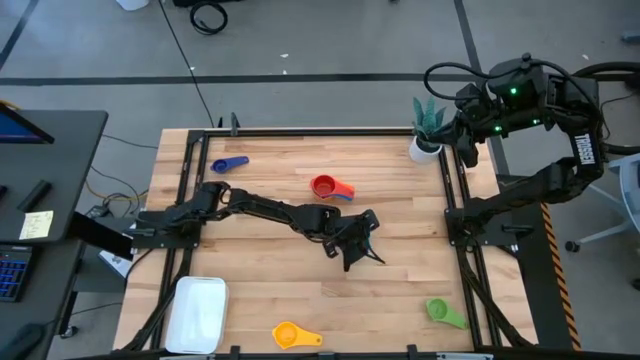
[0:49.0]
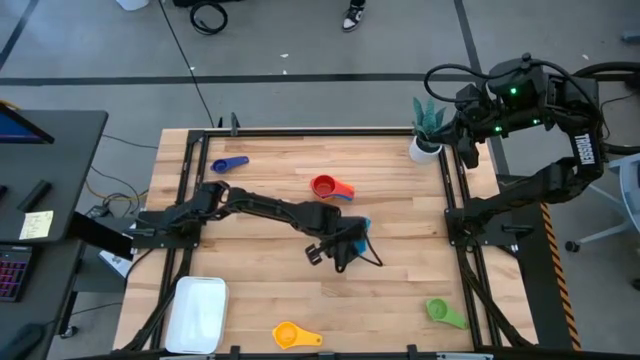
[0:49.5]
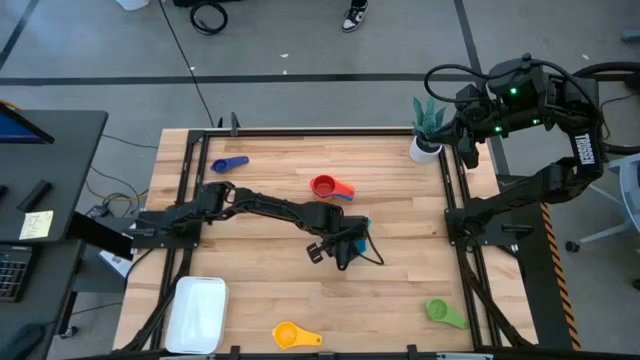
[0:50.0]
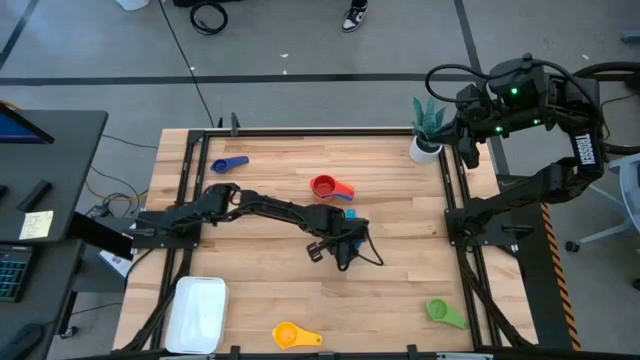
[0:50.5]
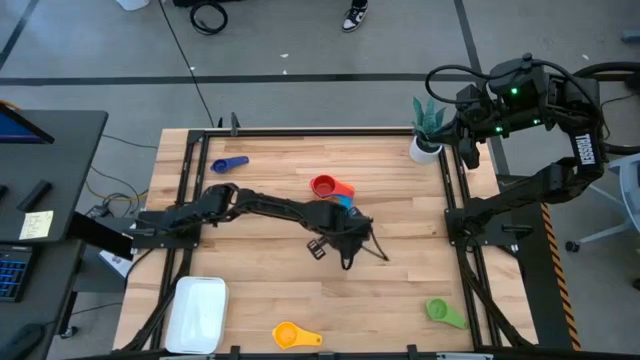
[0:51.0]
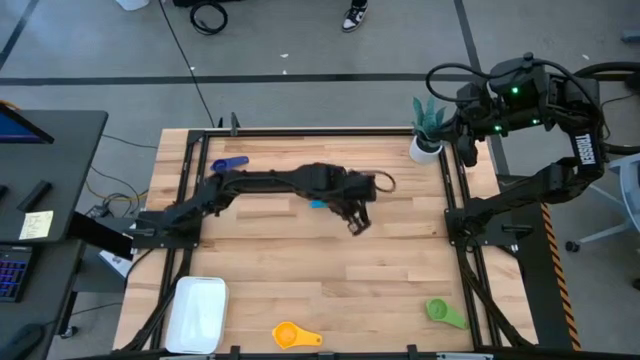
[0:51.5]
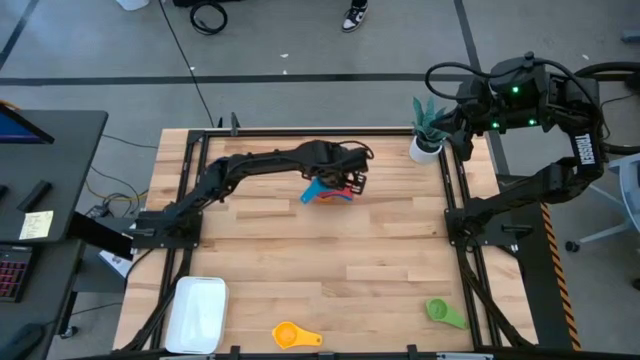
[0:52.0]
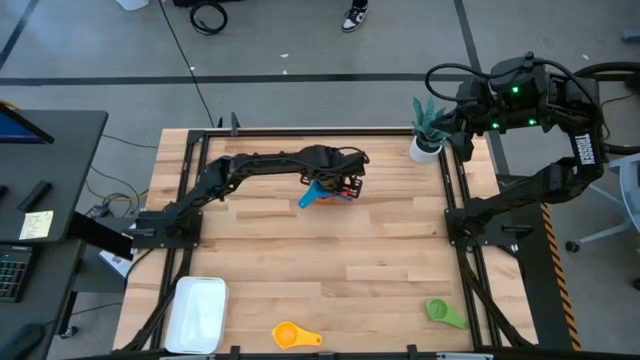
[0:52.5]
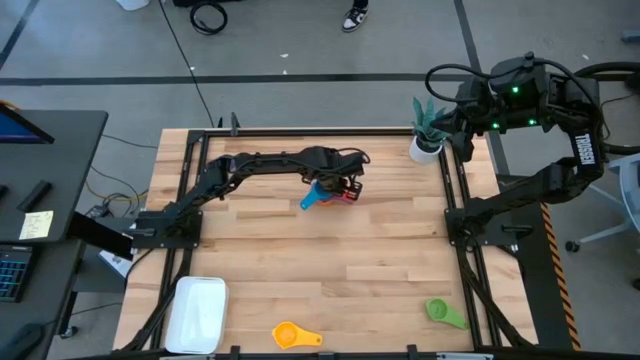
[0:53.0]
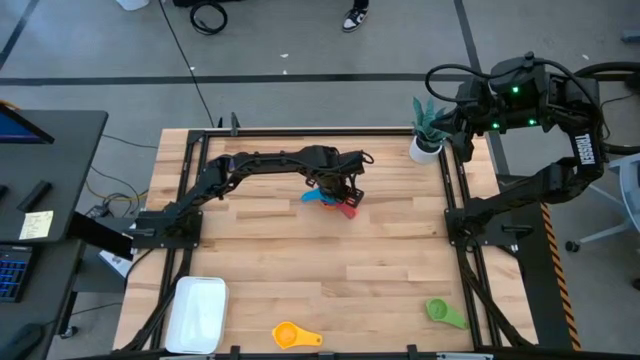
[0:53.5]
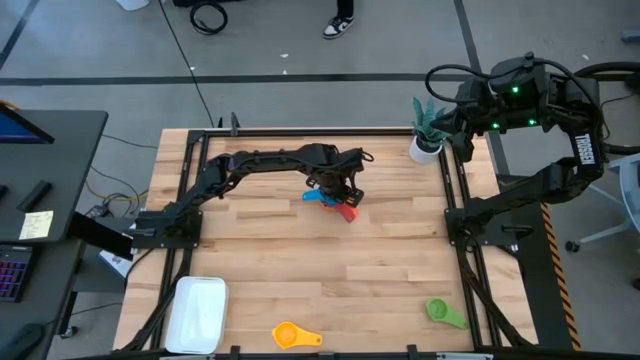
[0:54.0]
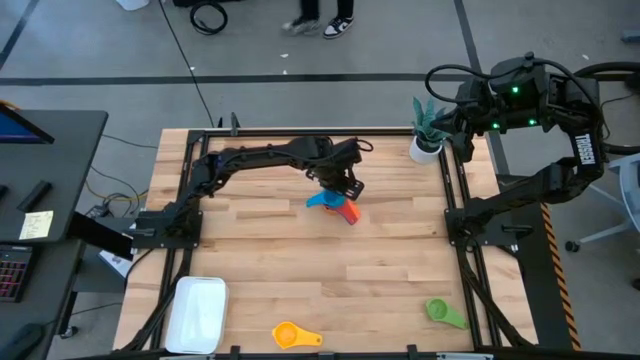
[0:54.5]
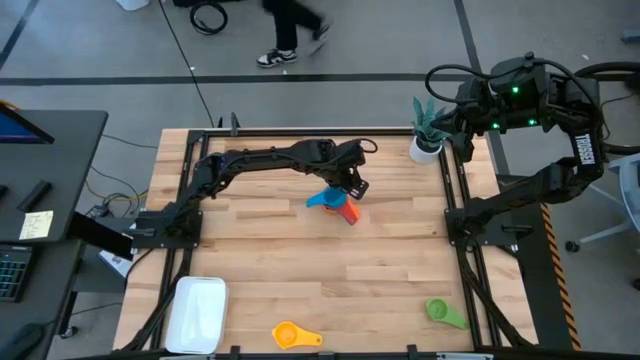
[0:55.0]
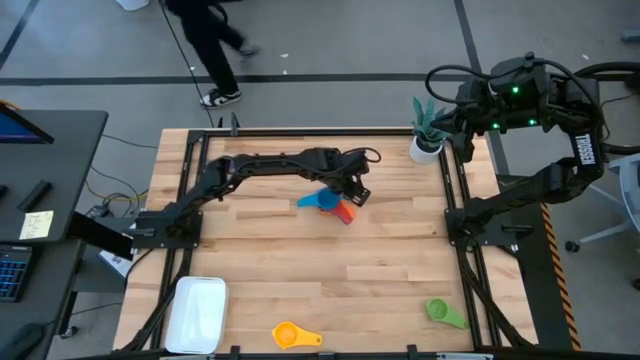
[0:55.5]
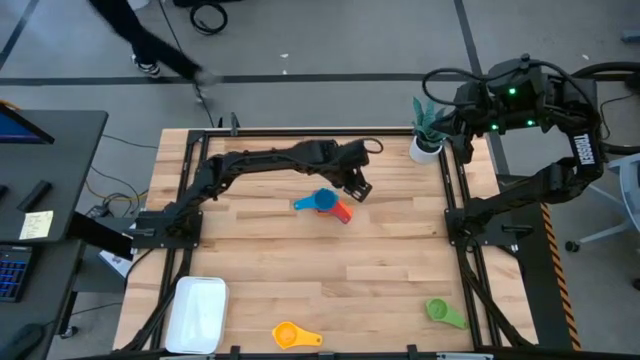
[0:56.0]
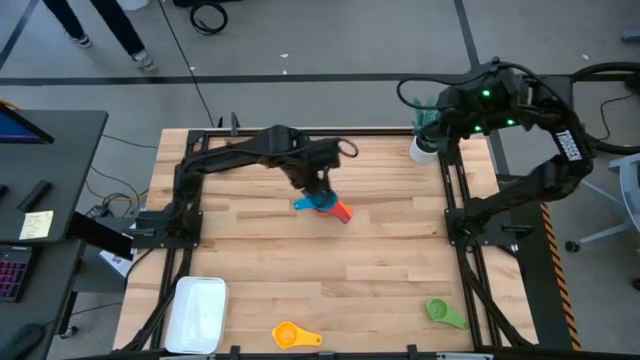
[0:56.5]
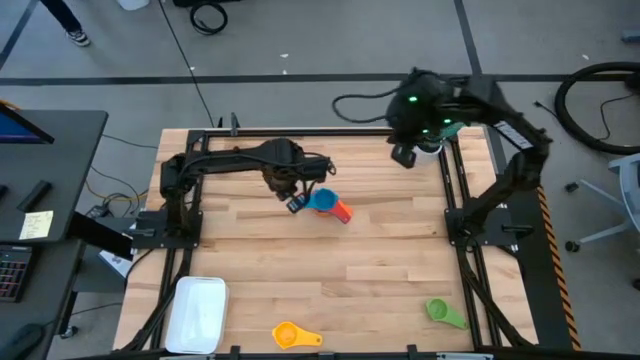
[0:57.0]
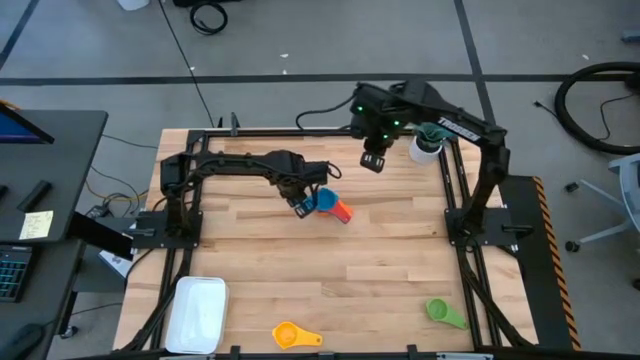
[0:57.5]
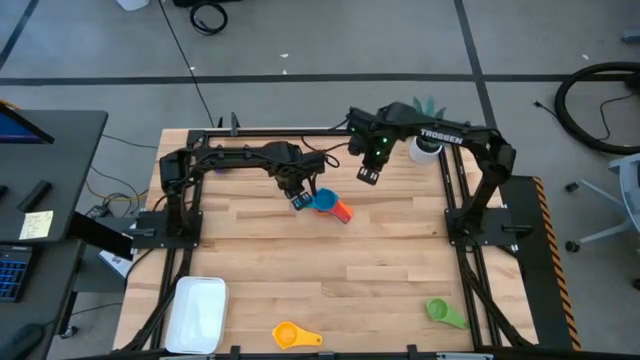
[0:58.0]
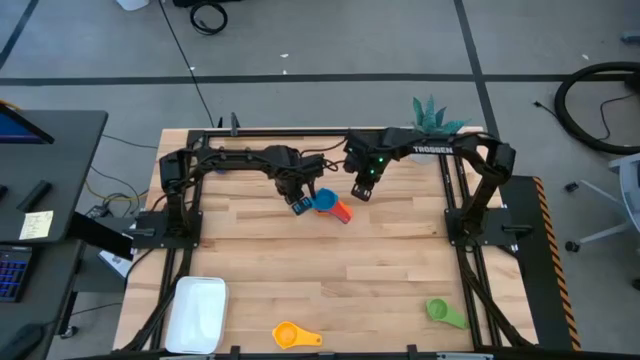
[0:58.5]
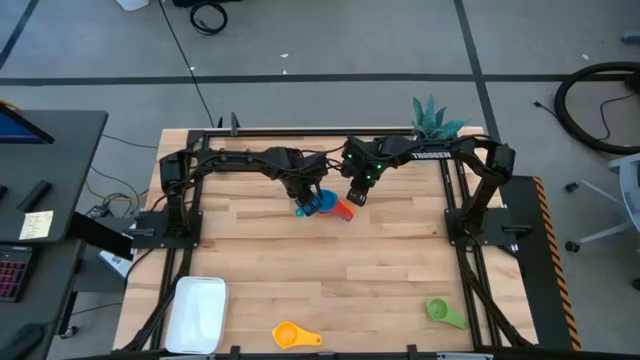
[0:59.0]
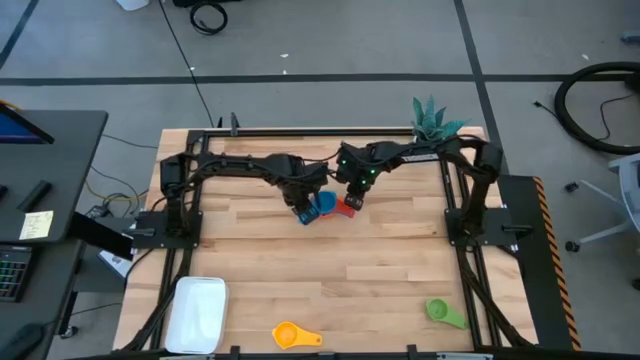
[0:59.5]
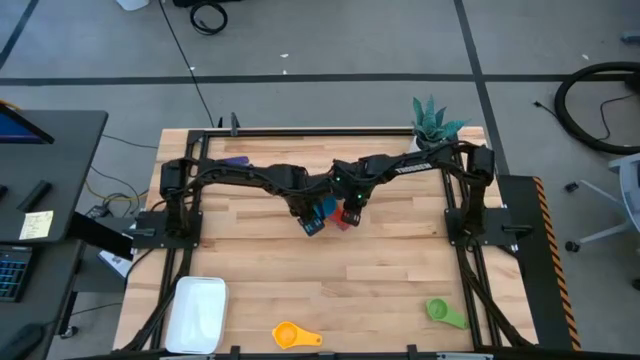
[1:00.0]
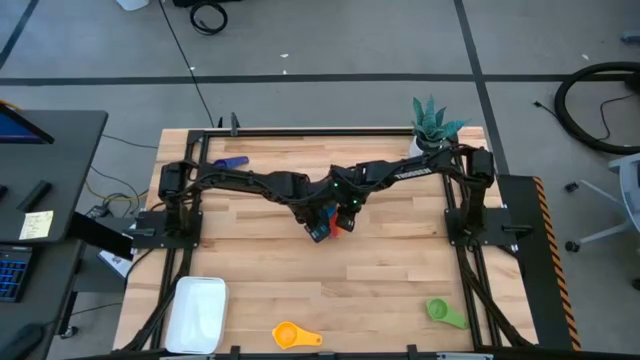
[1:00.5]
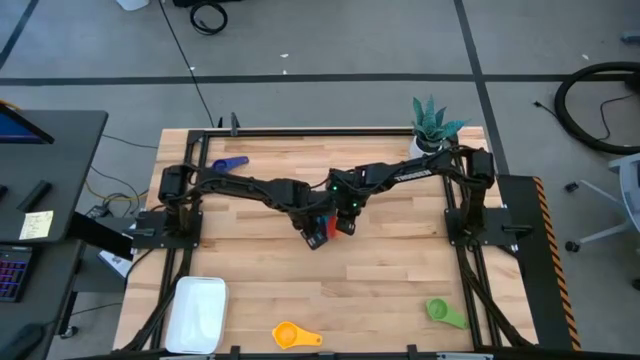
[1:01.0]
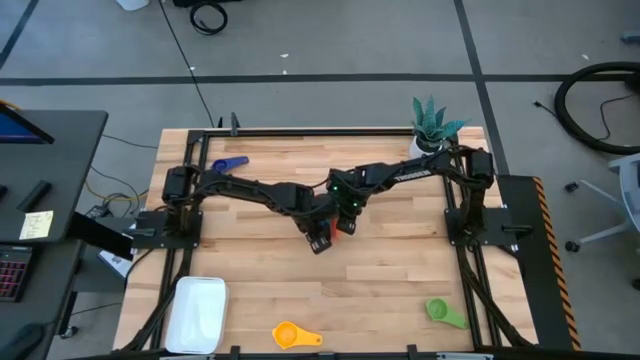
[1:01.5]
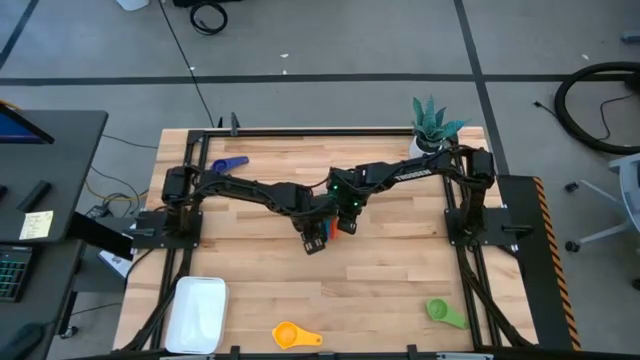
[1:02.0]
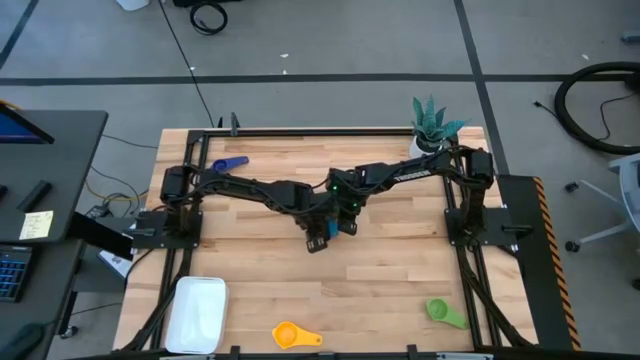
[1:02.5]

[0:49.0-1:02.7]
Task: Nest measuring cups in basket
Stack the light blue measuring cup on top of the red measuring cup

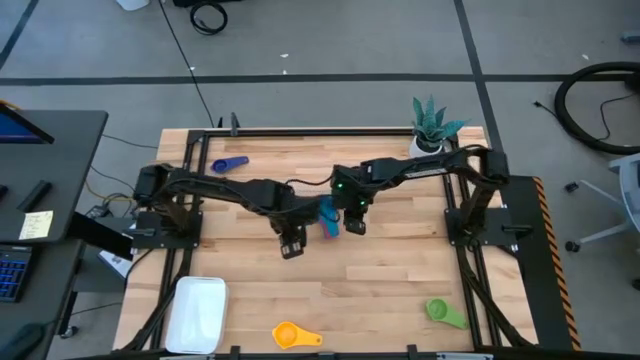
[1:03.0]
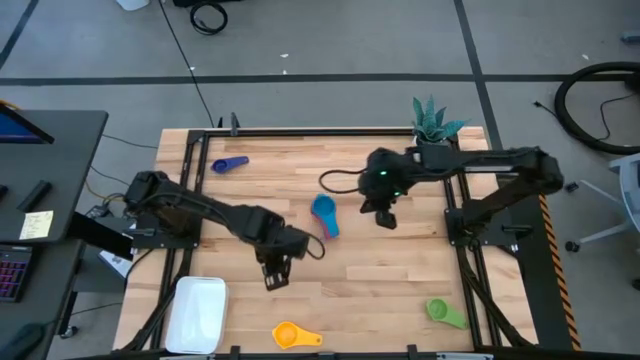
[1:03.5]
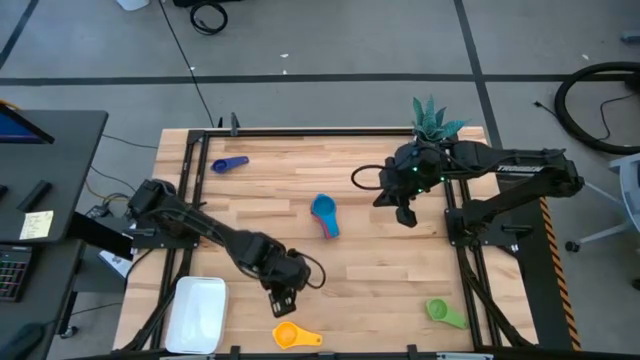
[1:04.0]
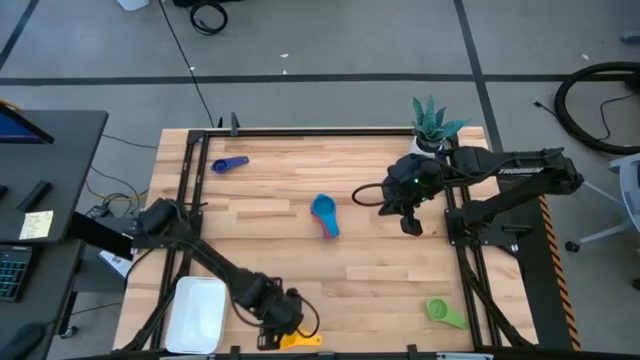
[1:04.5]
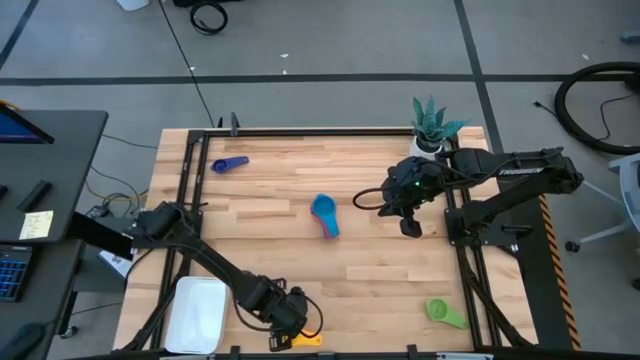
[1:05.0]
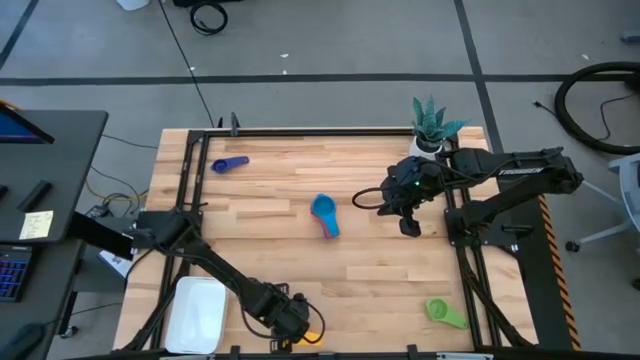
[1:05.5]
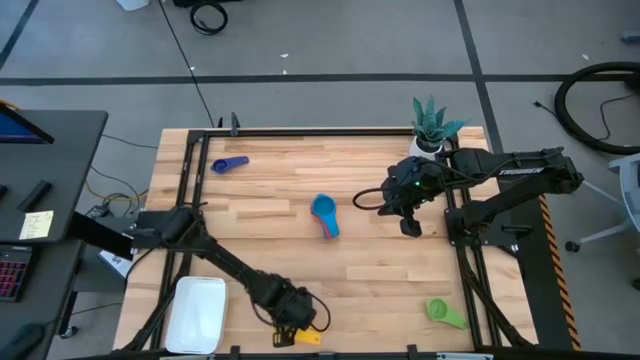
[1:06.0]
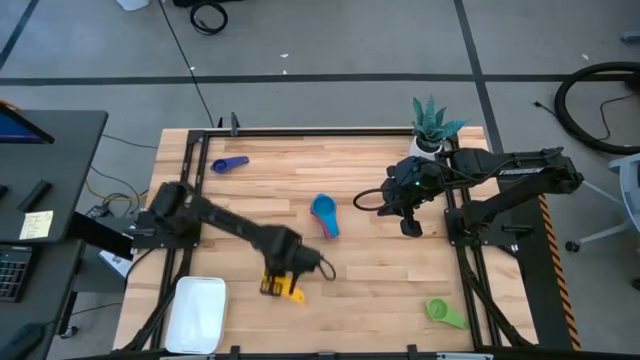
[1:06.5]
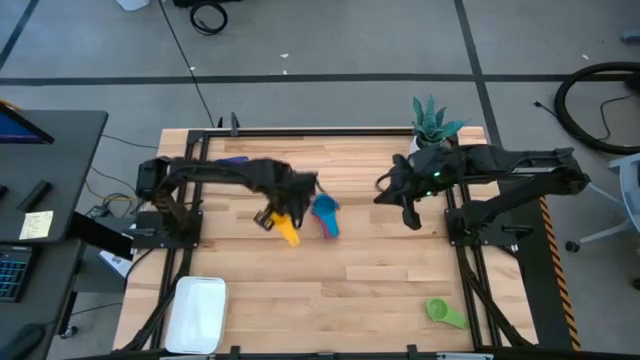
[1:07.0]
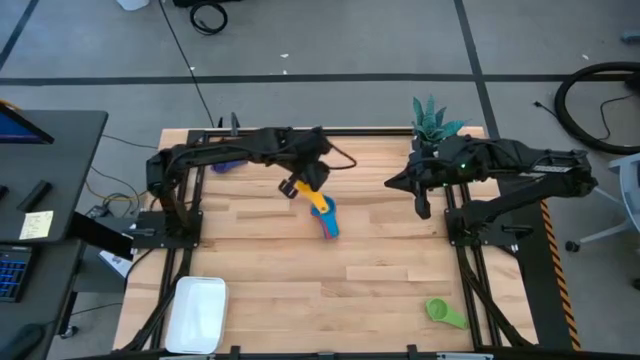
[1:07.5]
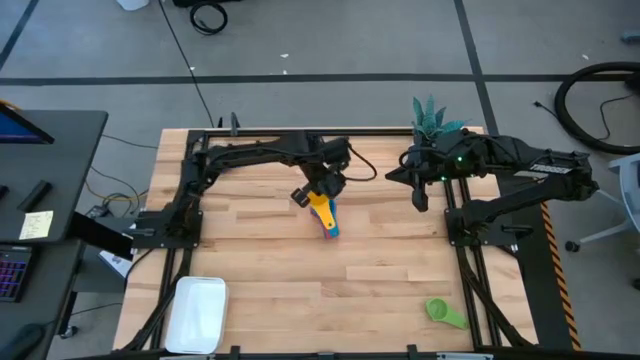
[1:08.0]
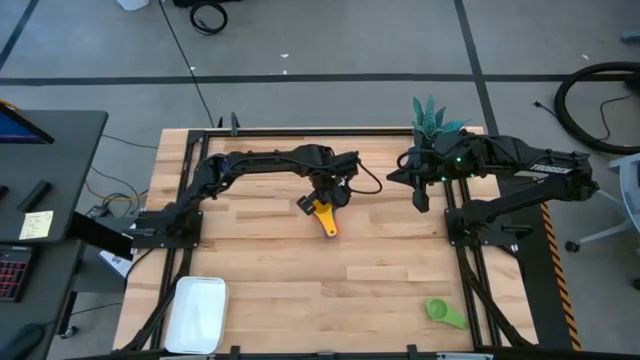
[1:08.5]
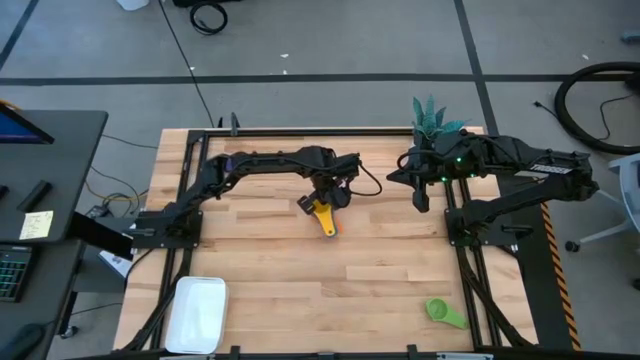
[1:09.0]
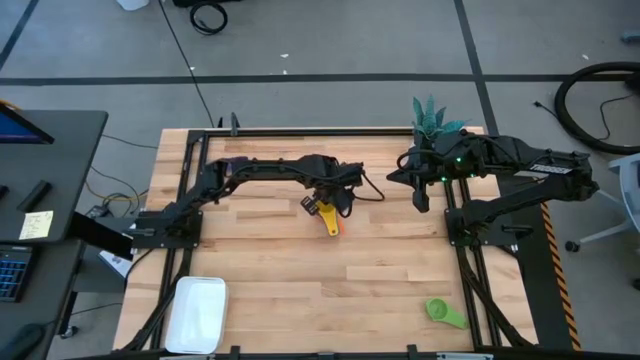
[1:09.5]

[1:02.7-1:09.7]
Stack the yellow measuring cup on top of the light blue measuring cup

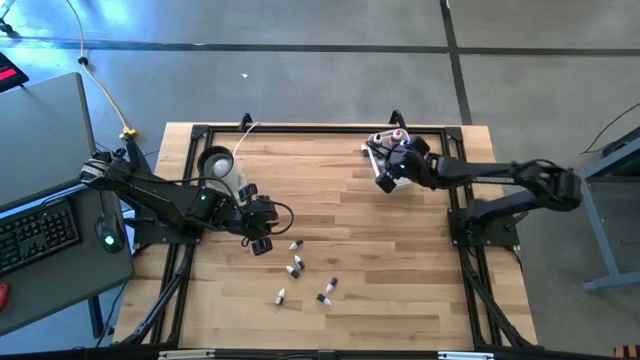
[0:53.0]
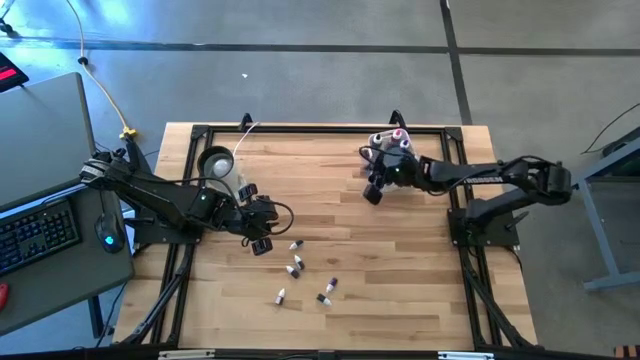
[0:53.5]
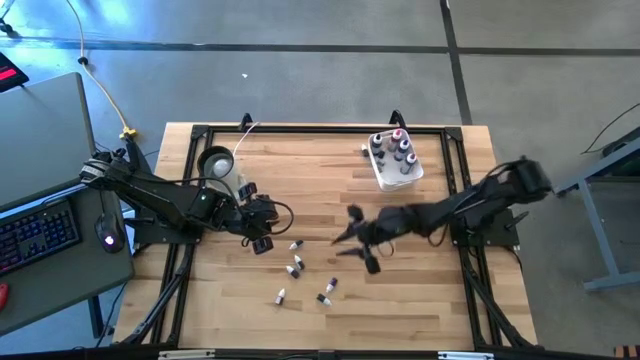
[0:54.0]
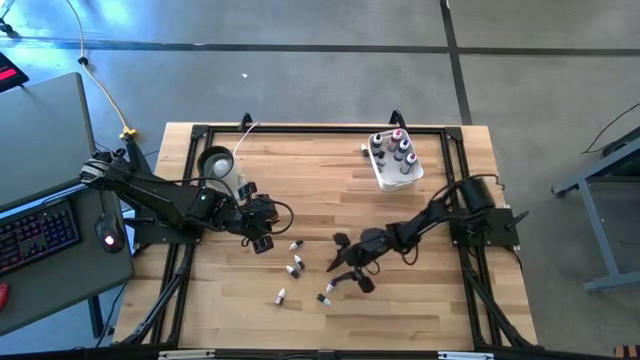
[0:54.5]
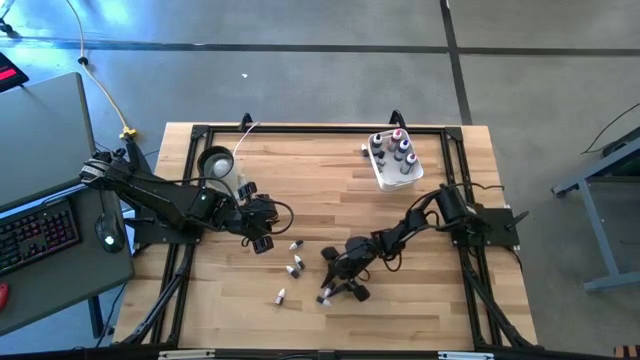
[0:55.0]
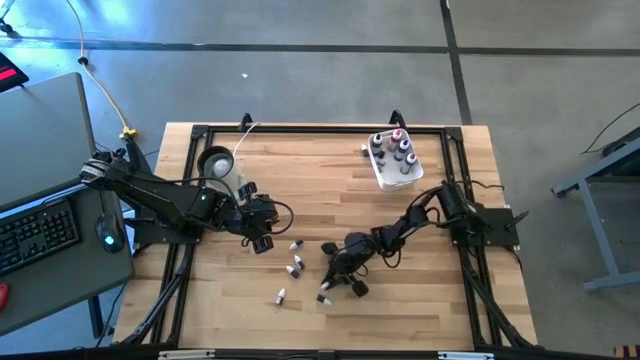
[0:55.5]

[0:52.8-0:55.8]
Task: Pick & Place food coloring
Put the bottom small violet food coloring bottle into the white bin
